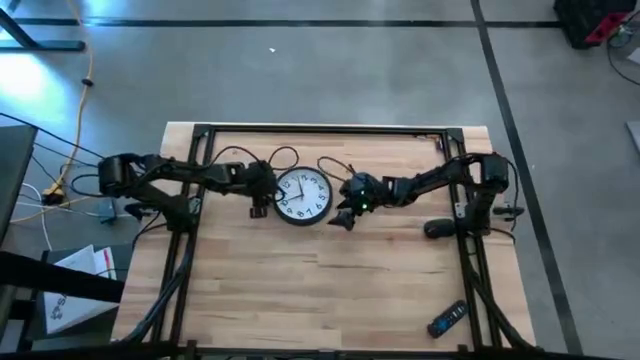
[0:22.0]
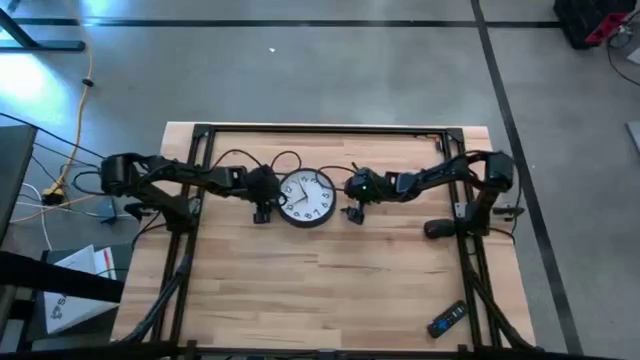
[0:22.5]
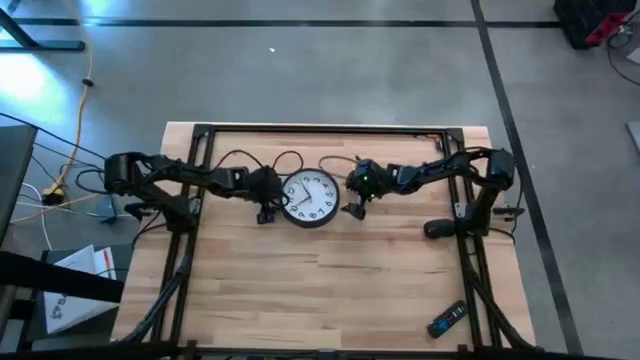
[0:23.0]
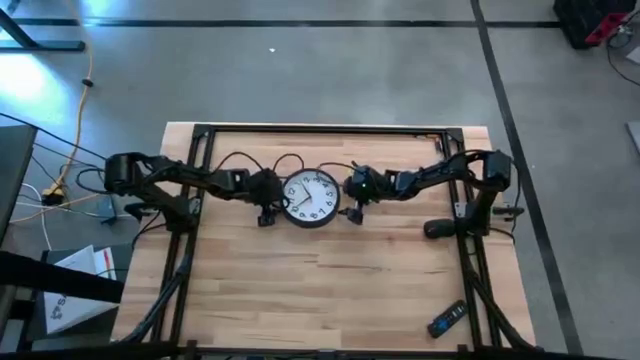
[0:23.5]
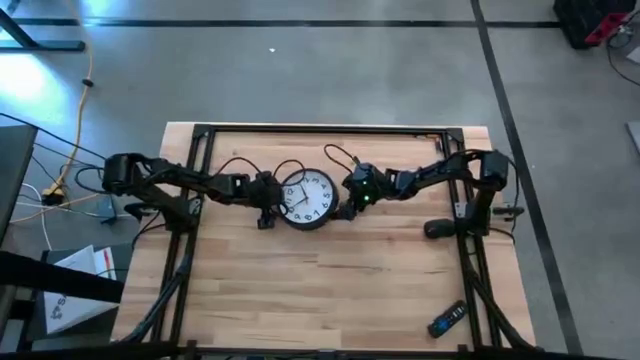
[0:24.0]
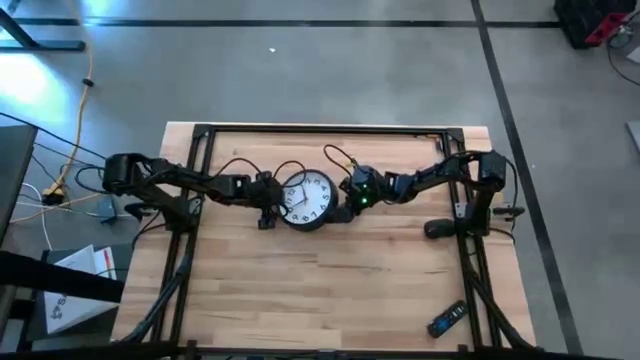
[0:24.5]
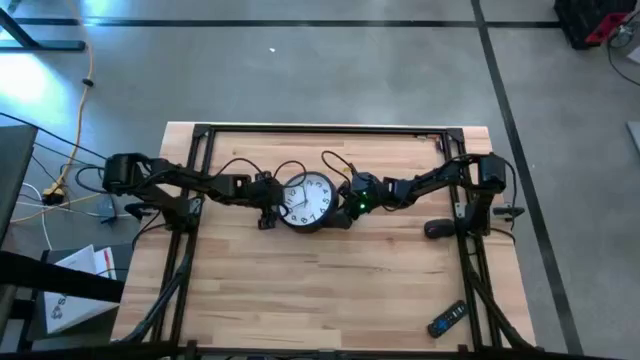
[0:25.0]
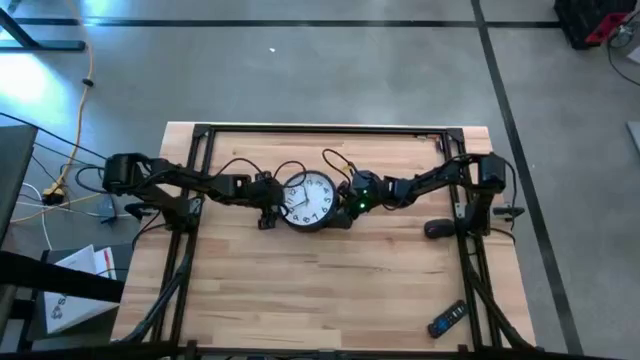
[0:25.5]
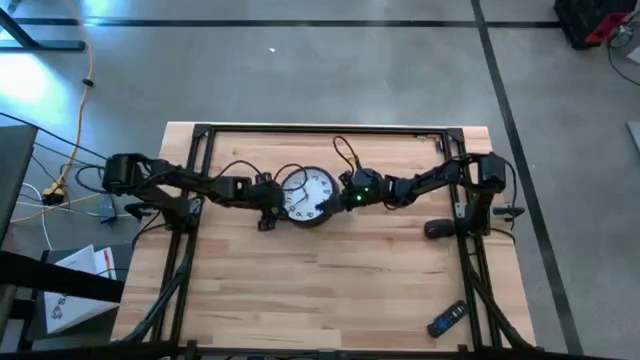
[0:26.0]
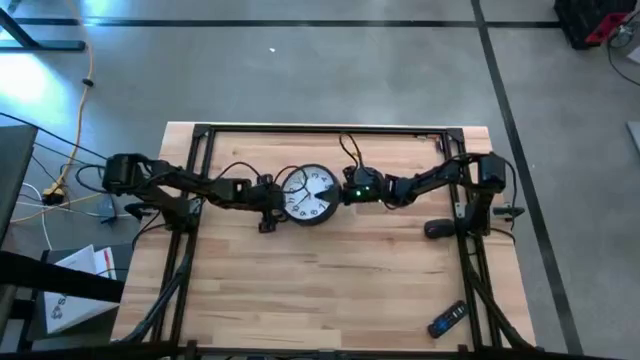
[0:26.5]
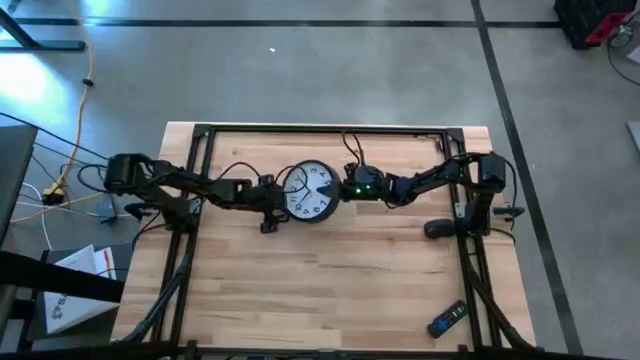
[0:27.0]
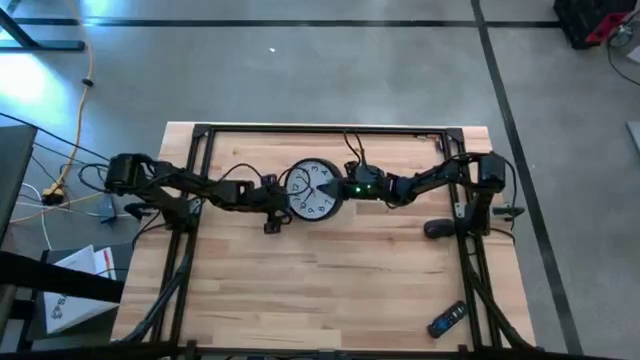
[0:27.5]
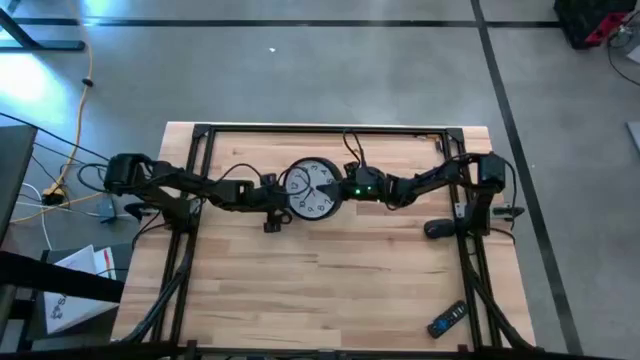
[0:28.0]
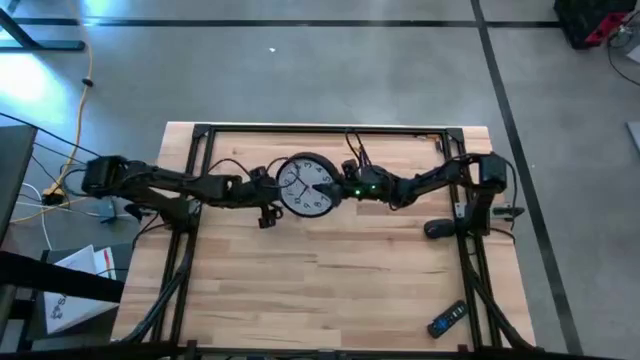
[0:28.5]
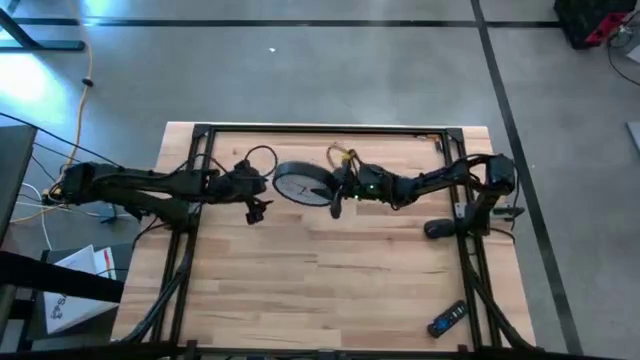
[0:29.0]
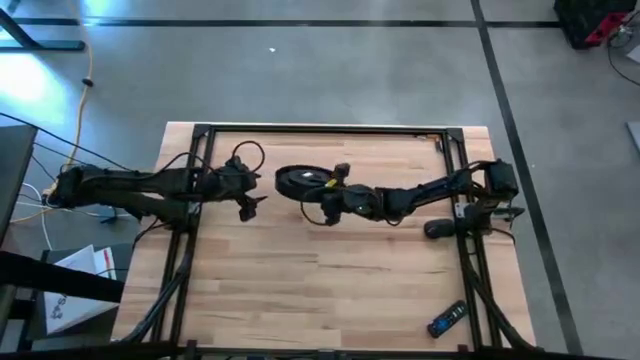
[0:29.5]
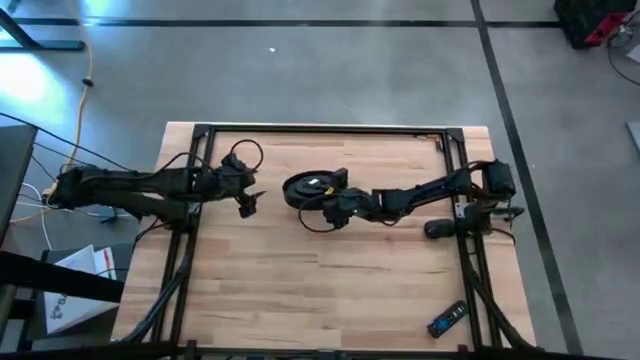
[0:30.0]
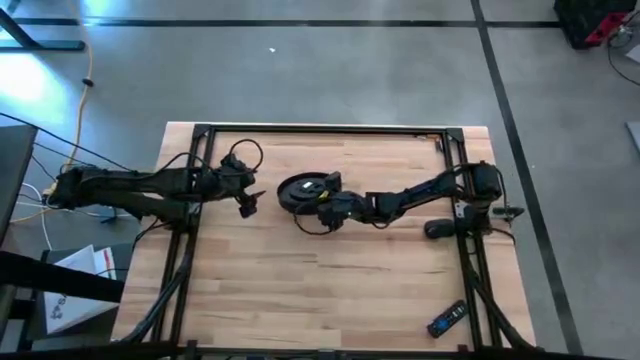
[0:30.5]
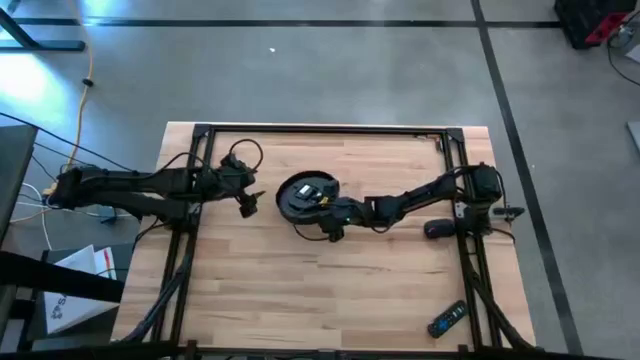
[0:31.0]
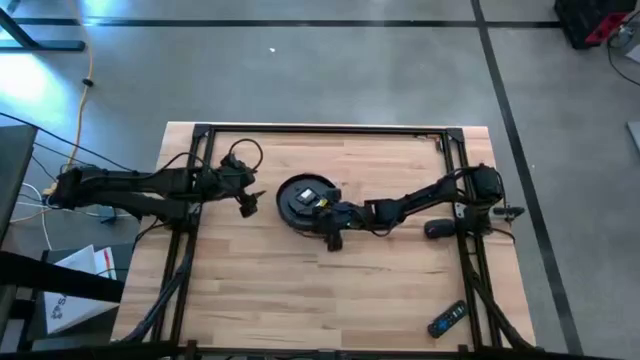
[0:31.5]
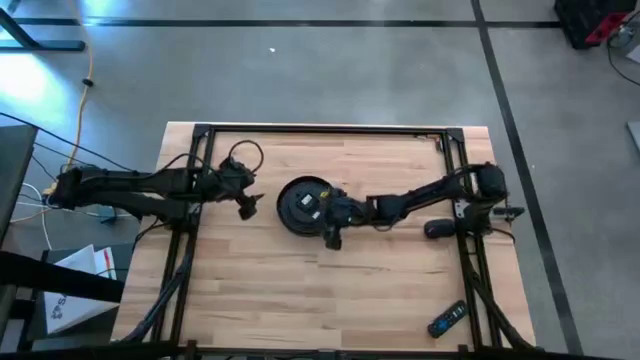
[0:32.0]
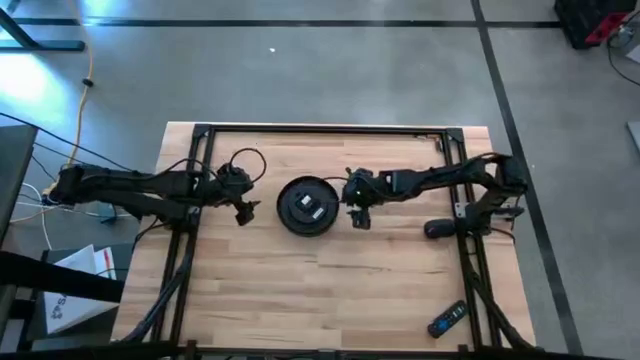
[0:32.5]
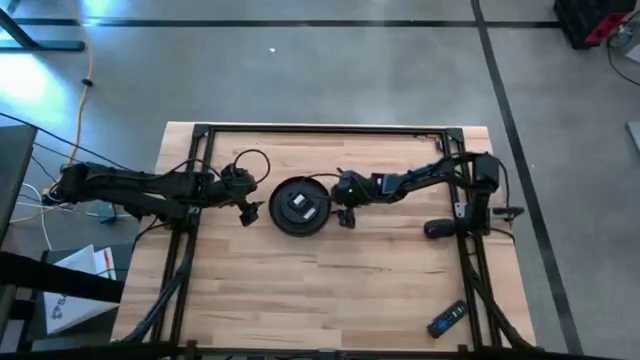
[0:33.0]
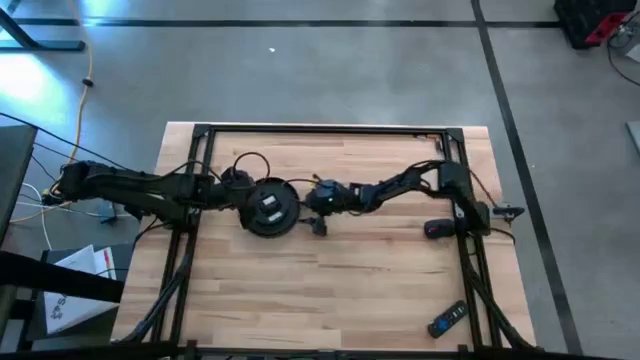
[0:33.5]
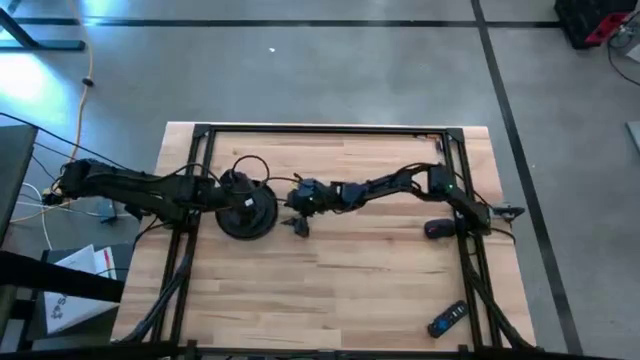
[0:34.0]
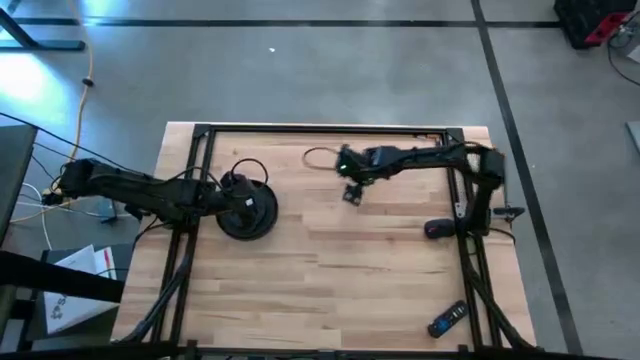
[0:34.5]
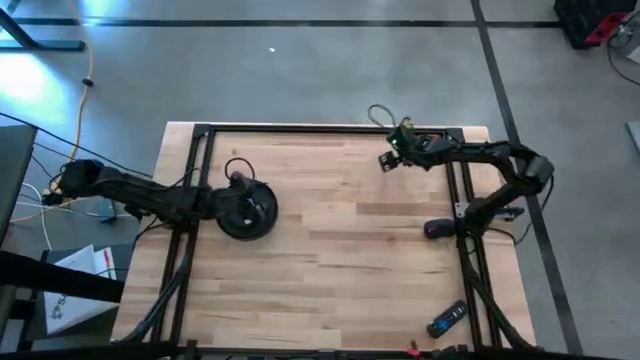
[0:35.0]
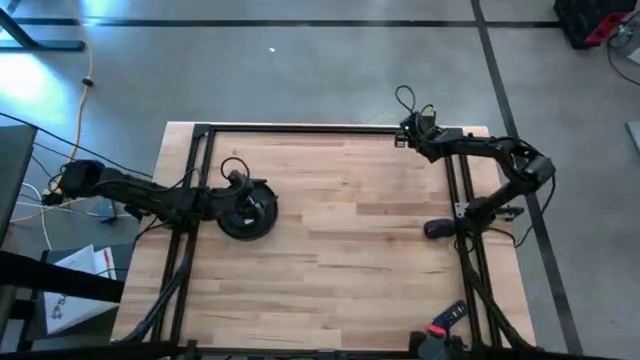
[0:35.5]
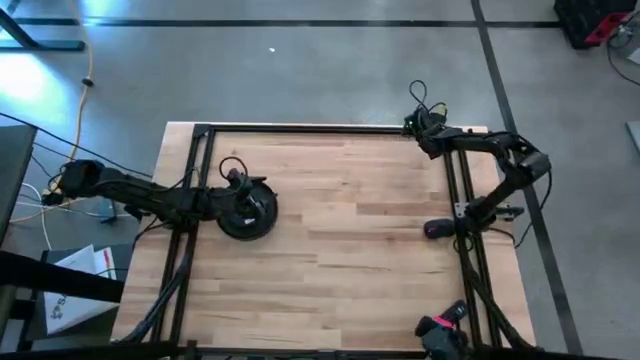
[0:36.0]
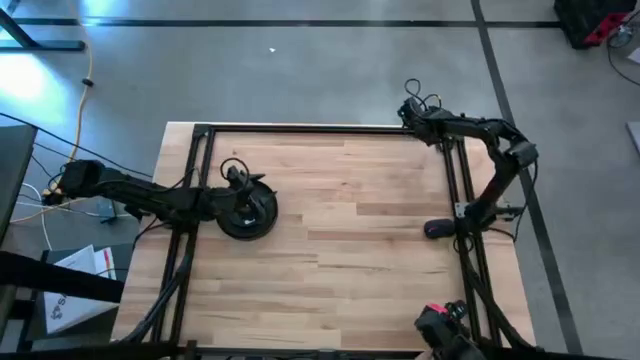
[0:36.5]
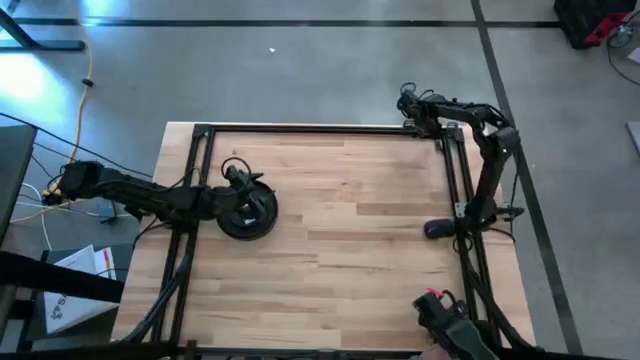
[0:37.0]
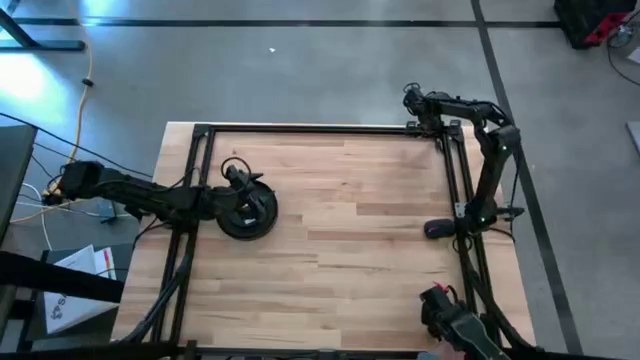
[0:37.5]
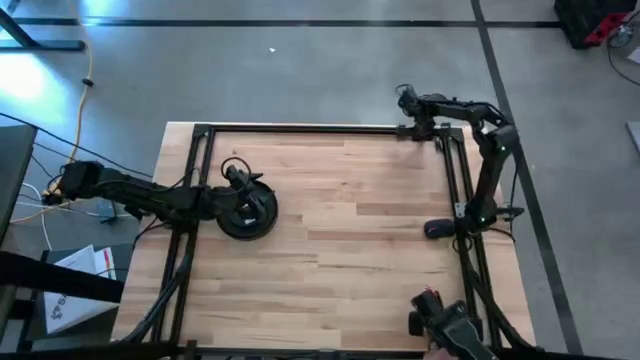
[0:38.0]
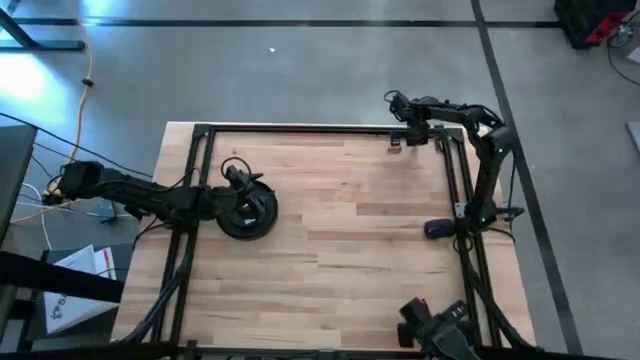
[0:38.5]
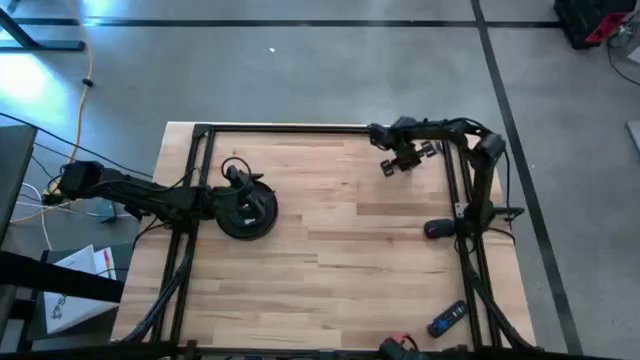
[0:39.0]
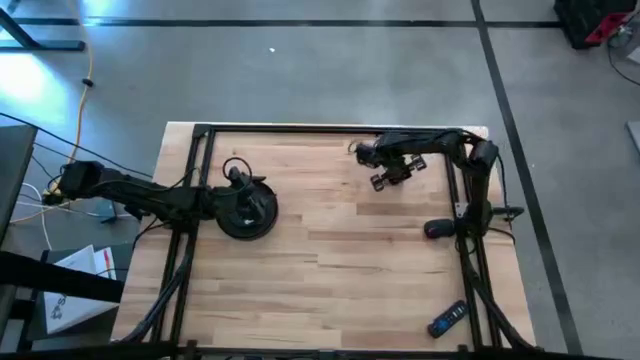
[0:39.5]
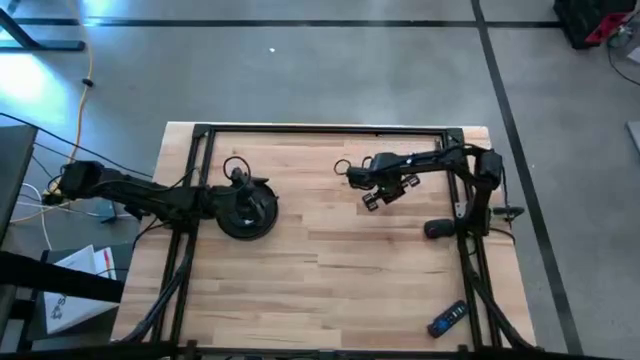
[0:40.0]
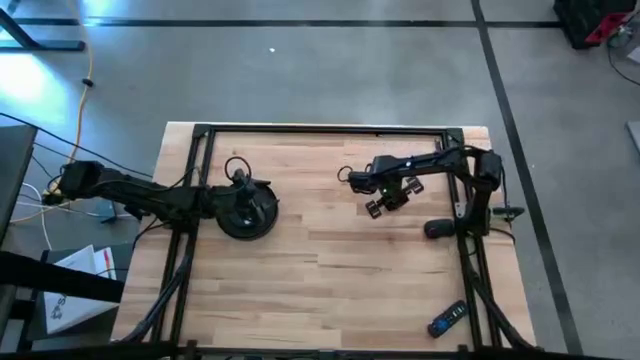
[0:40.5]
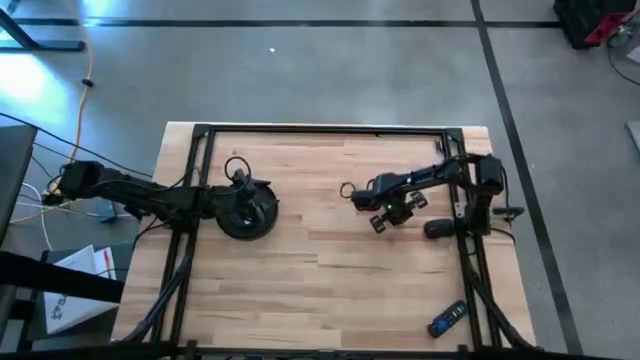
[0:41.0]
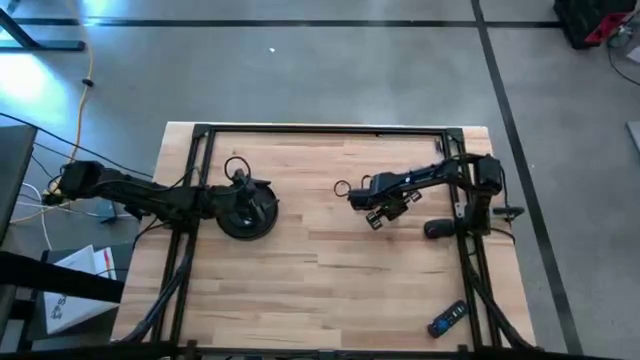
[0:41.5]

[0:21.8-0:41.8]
Task: Insert battery
Insert the yellow battery into the white-black wall clock

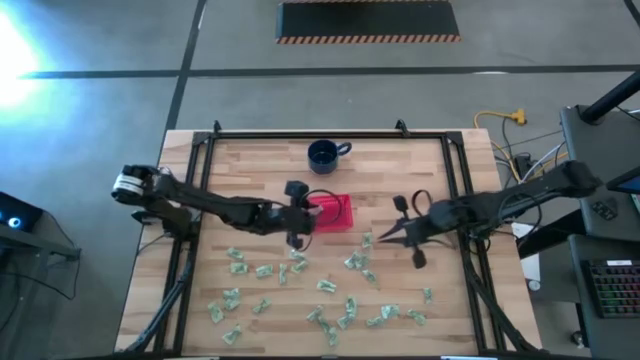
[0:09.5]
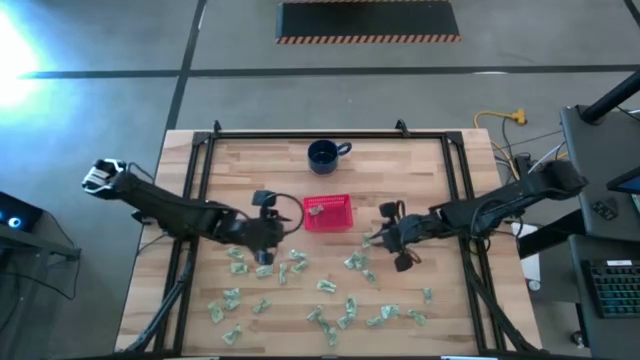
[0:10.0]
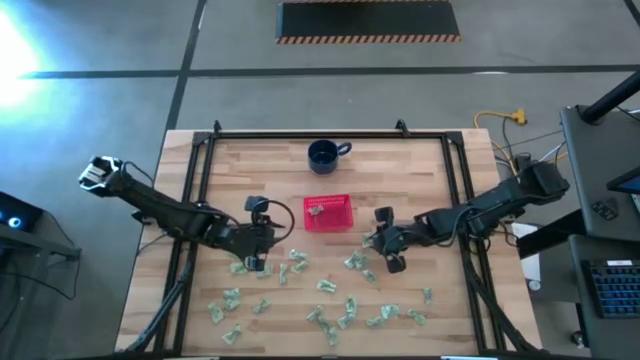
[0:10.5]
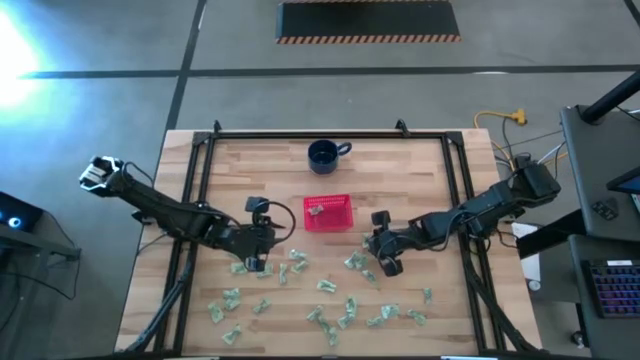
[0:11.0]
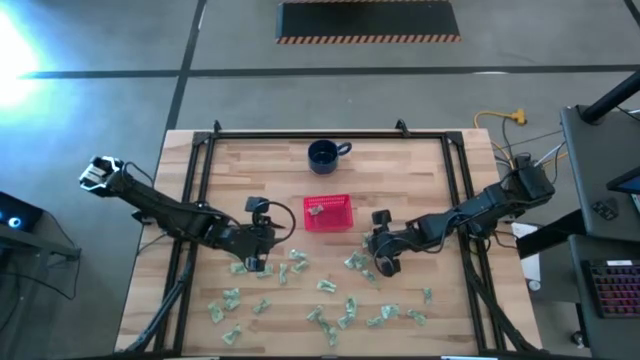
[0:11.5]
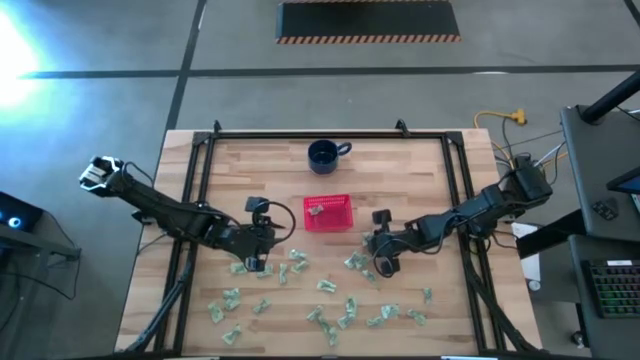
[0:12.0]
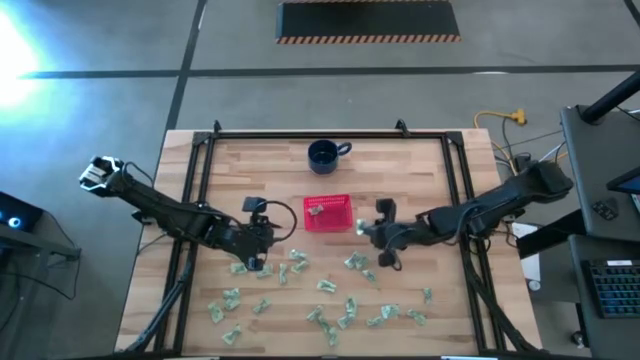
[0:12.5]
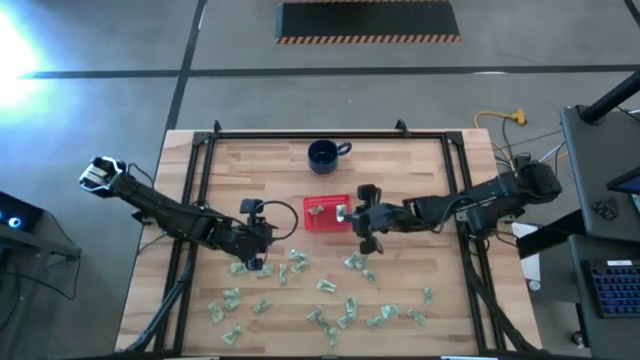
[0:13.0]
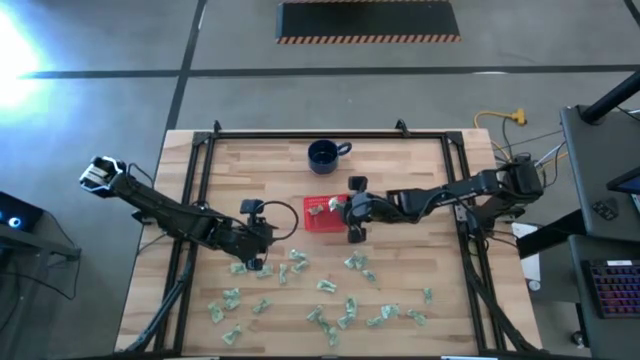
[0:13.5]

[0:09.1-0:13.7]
Task: Pick and place items into bin
Put the stevia packet into the red bin
